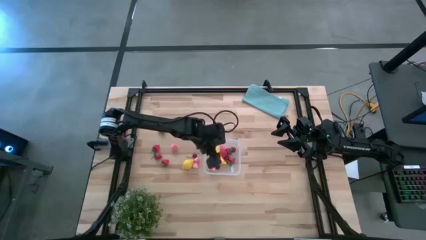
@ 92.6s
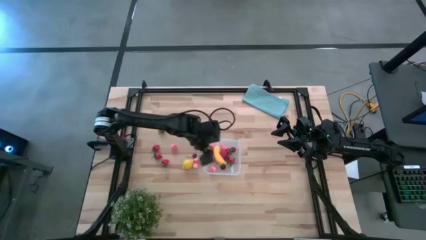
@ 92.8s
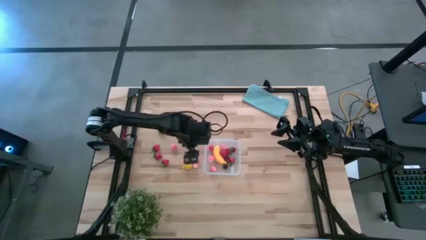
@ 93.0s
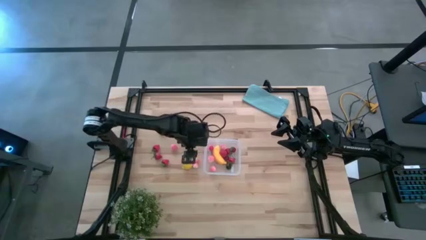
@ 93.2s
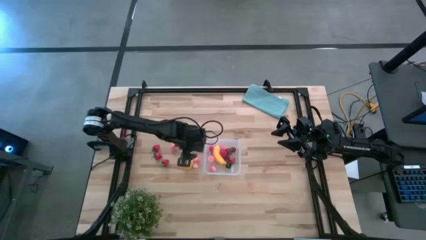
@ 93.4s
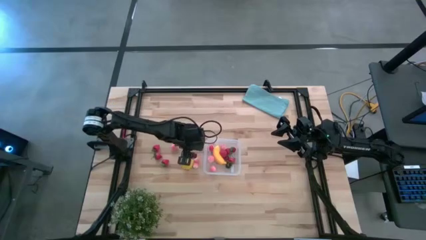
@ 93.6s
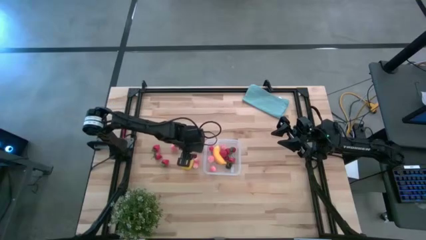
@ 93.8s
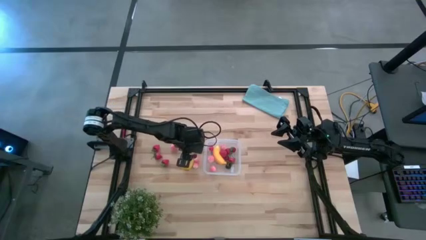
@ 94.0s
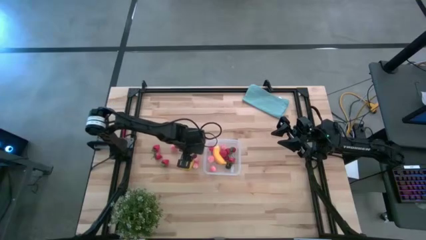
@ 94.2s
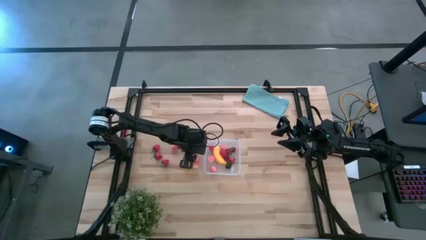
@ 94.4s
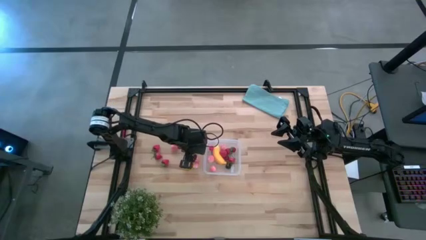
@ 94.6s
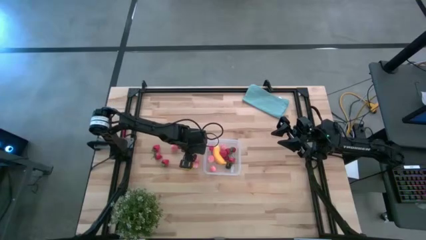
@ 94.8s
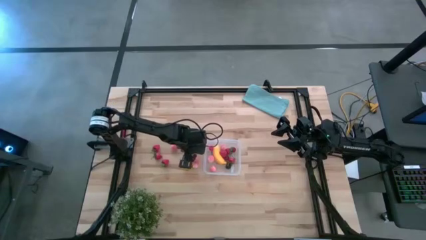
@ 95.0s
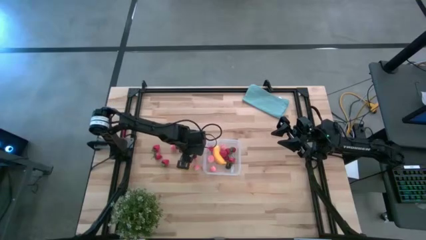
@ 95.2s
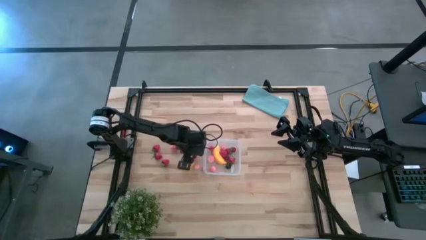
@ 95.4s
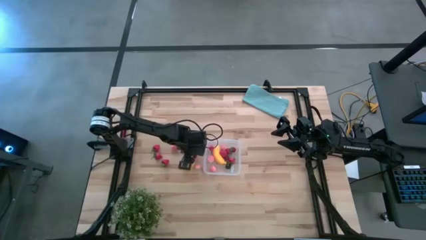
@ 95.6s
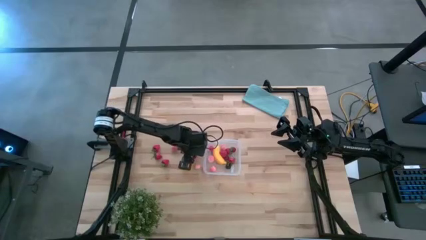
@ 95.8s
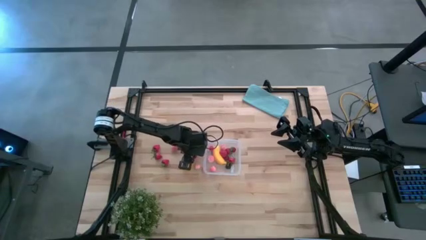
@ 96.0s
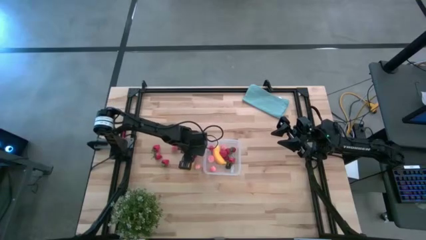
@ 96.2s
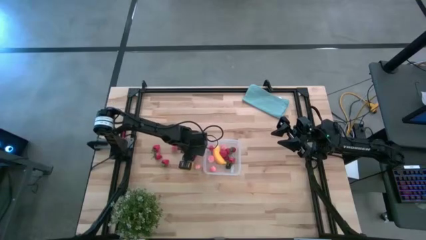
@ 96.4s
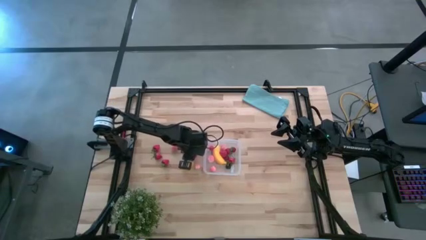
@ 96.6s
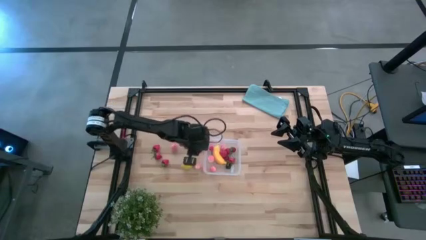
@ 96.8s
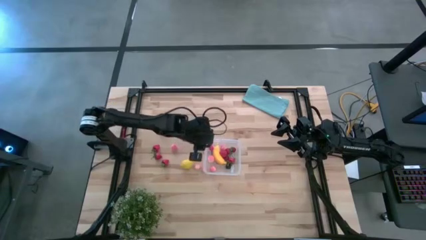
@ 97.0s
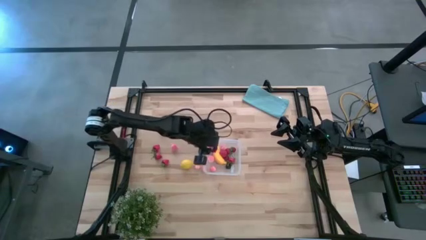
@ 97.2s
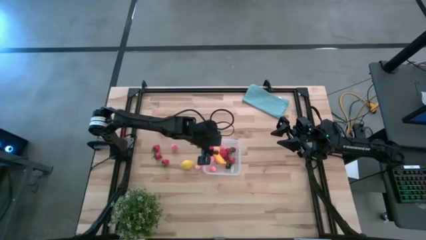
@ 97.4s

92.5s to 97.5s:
Task: Pick and placing Produce into tupperware
Put the red cherry into the transparent bin

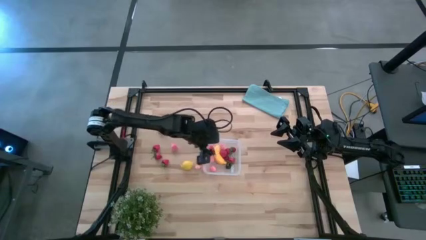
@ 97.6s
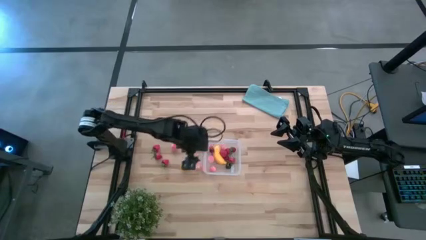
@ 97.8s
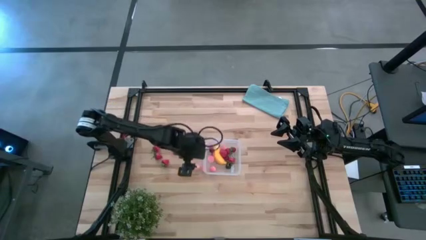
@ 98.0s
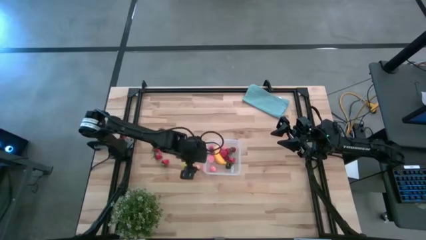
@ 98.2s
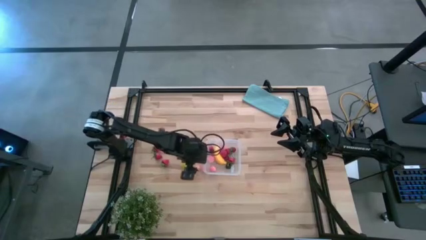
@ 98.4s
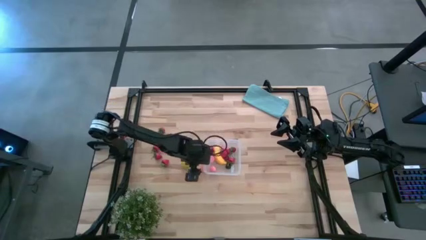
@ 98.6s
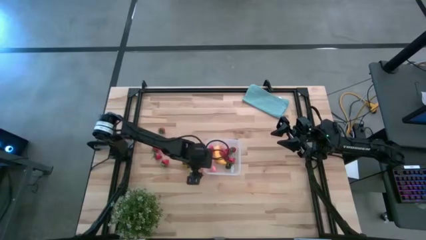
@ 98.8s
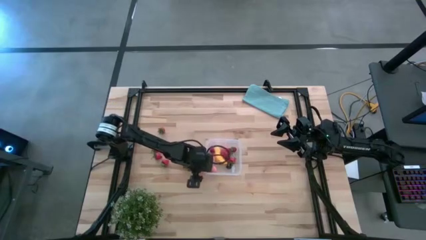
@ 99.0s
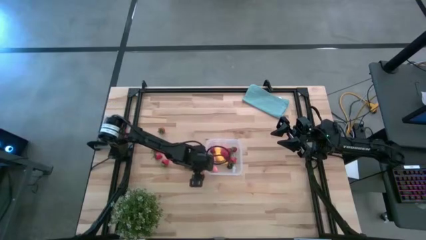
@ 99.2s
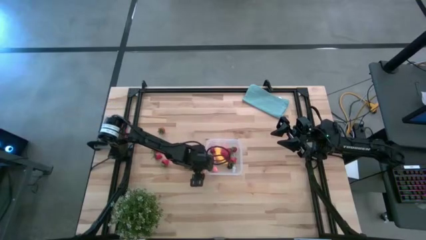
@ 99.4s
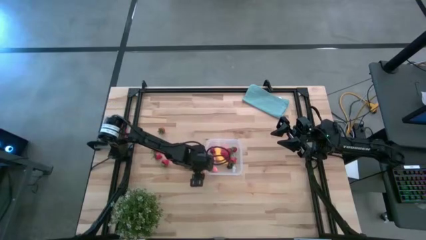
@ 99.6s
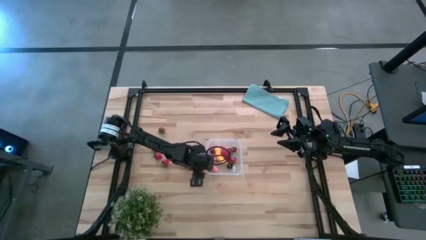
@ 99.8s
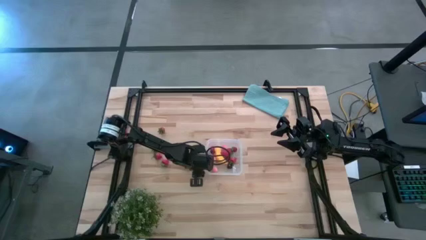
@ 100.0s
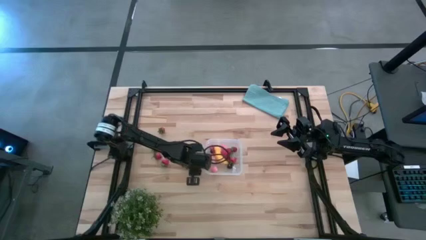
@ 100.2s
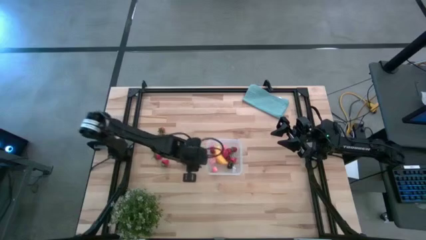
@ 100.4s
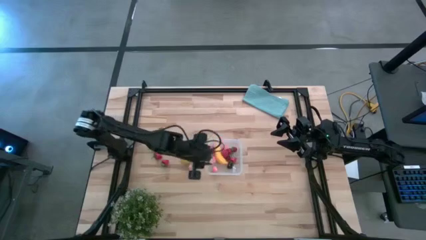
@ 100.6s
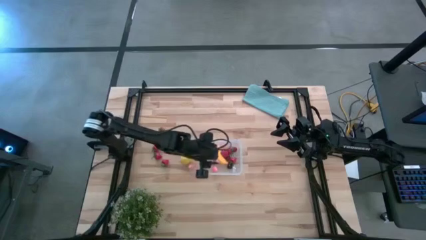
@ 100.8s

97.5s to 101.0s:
Put the pink peach into the transparent bin

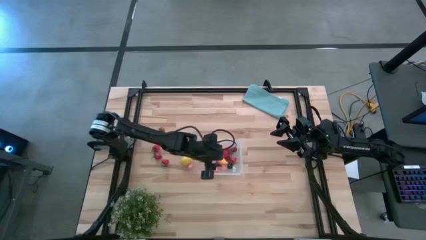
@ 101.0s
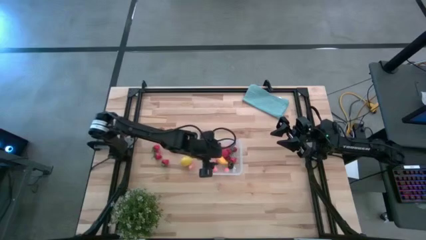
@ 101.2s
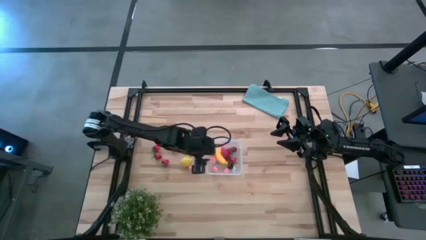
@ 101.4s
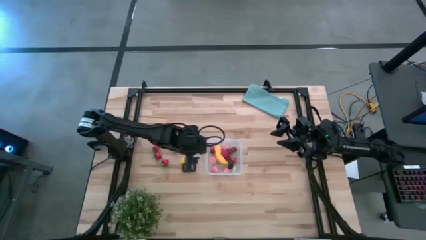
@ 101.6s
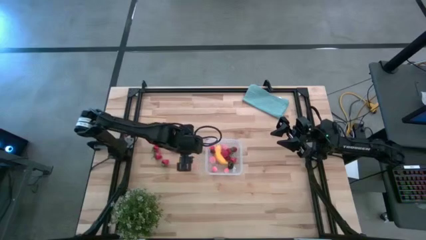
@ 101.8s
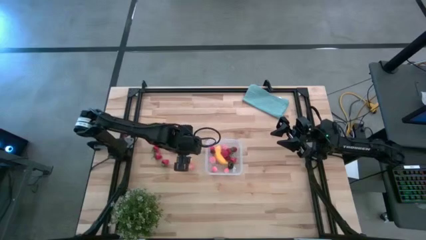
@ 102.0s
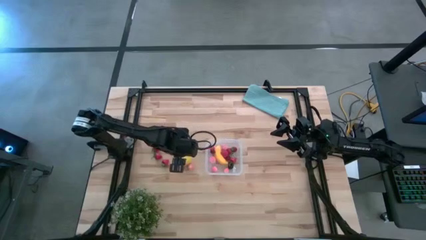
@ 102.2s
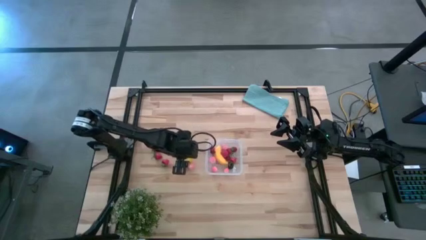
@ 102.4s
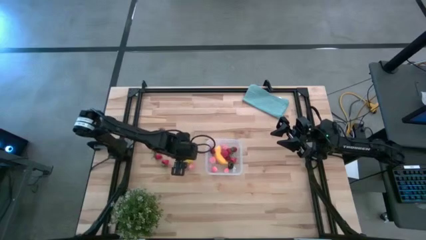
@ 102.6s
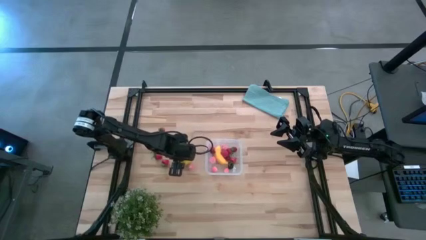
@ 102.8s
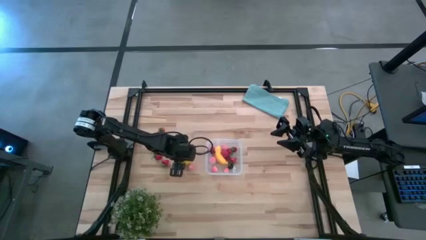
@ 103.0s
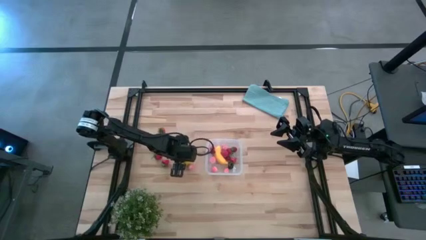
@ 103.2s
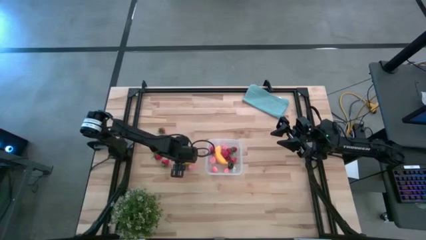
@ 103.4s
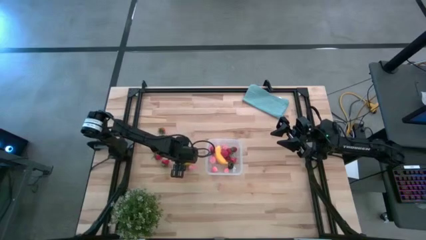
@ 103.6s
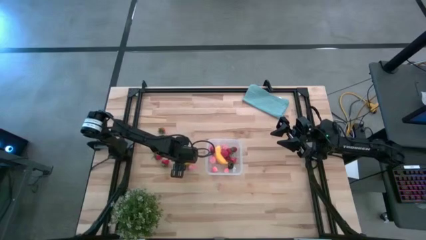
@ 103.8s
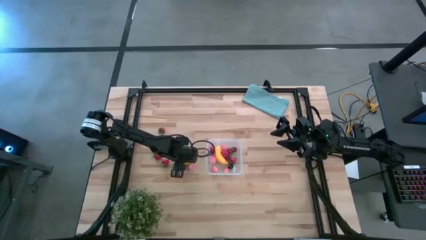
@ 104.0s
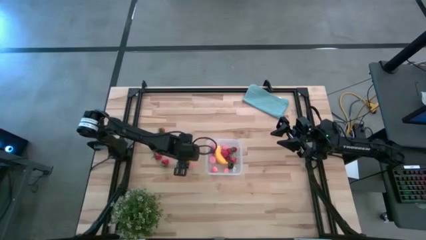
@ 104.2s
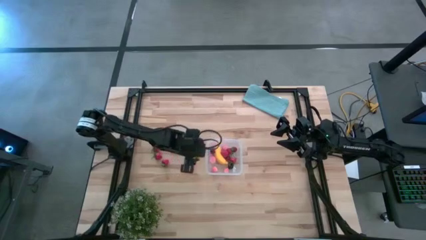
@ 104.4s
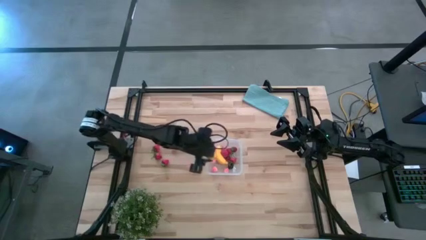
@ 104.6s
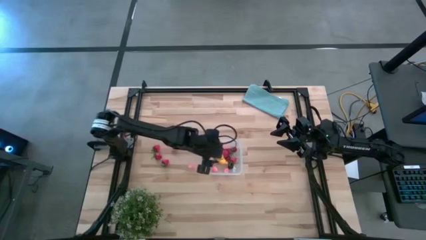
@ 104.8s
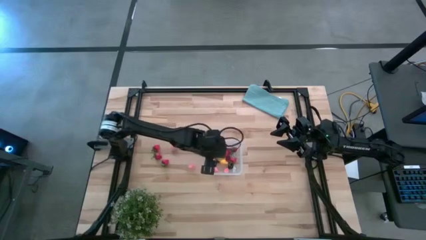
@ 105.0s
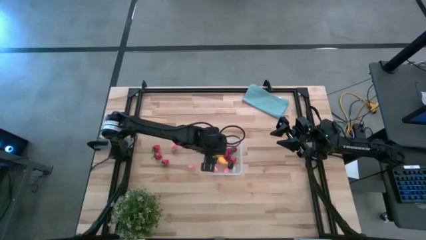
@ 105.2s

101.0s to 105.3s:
Put the yellow lemon into the transparent bin

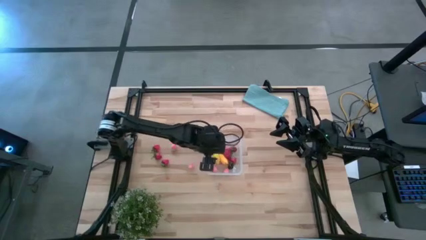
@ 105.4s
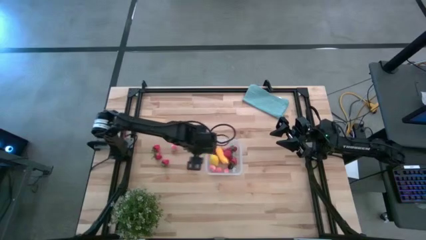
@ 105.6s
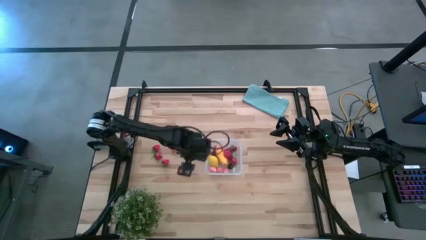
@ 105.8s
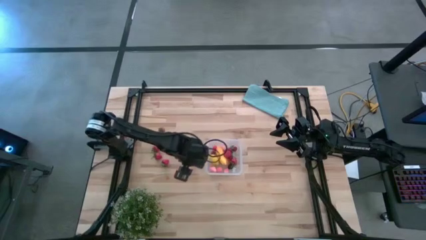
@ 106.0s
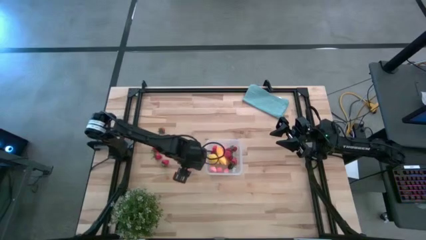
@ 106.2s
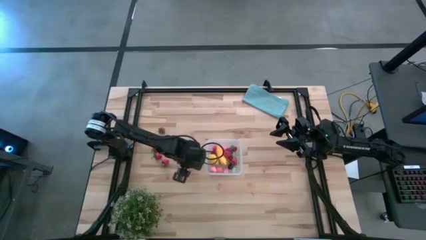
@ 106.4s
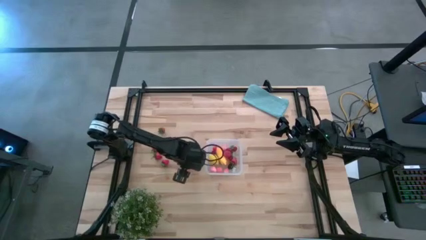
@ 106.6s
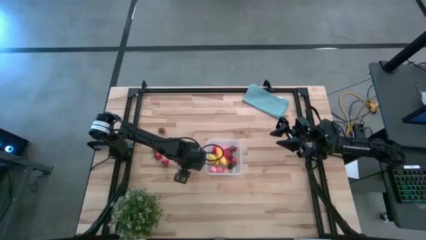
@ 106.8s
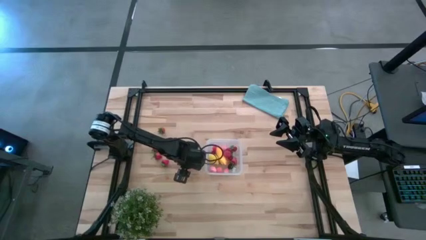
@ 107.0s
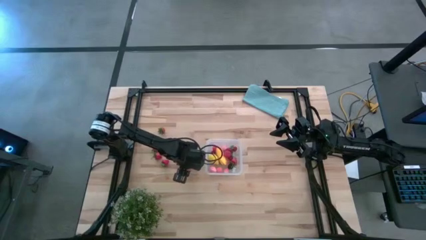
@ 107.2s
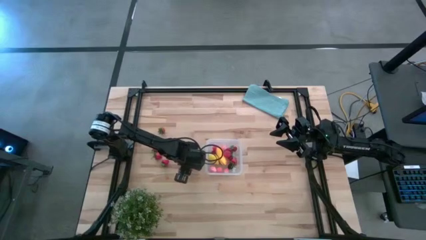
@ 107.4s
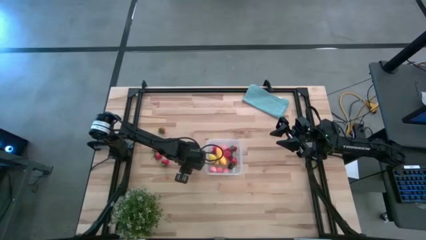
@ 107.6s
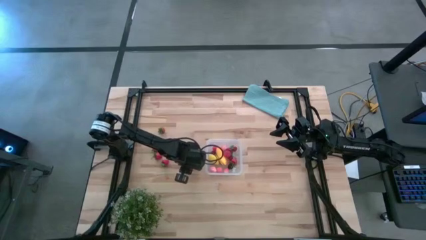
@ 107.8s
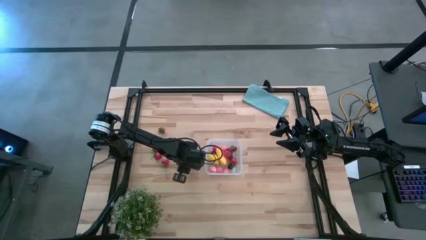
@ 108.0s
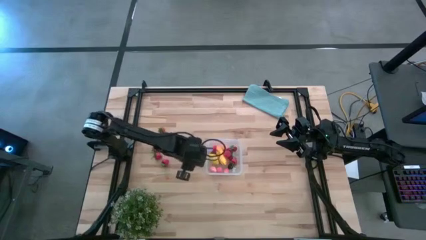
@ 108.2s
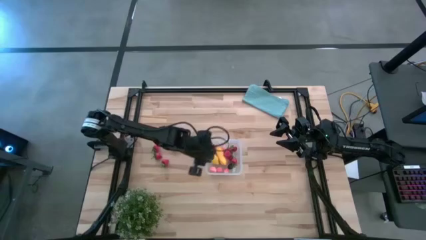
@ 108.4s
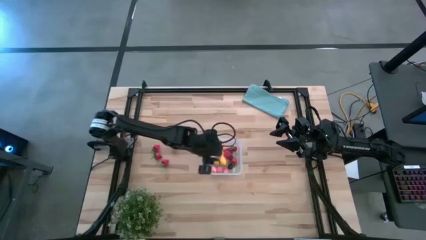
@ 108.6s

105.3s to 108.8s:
Put the pink peach into the transparent bin
